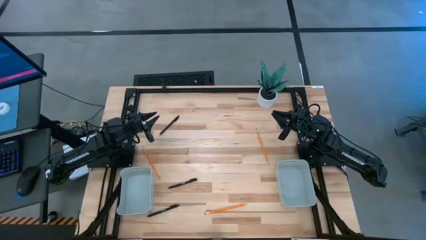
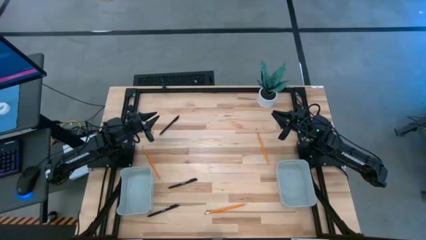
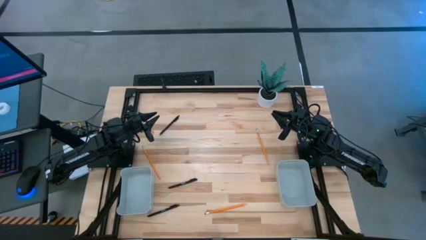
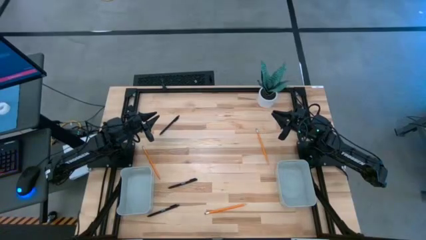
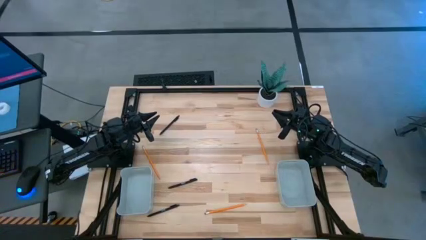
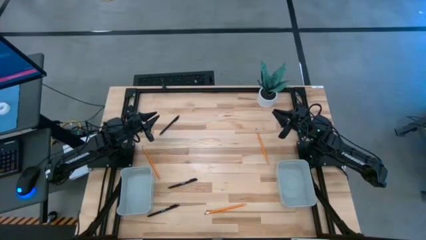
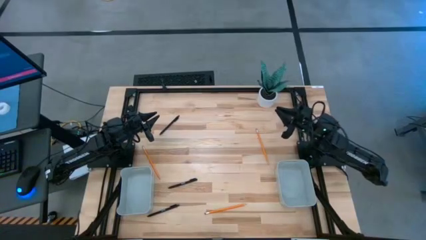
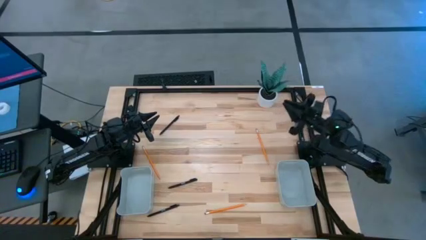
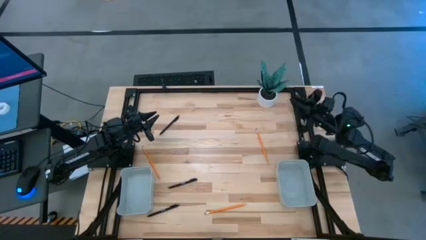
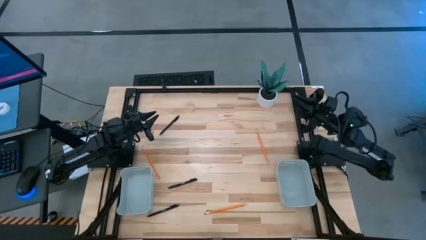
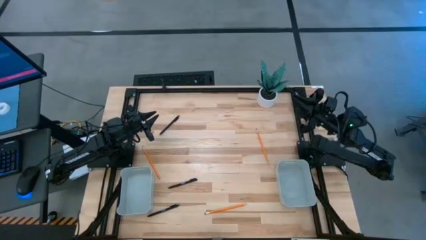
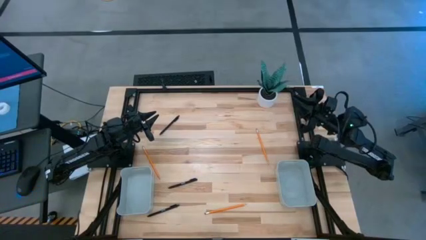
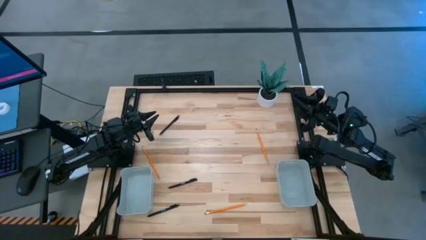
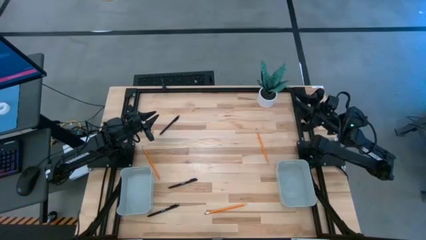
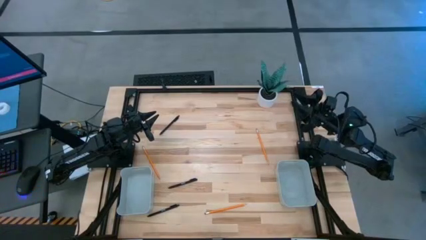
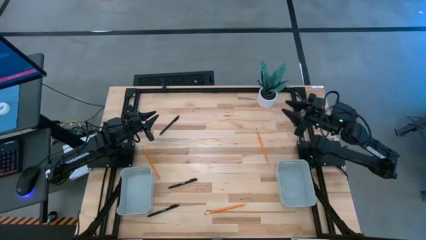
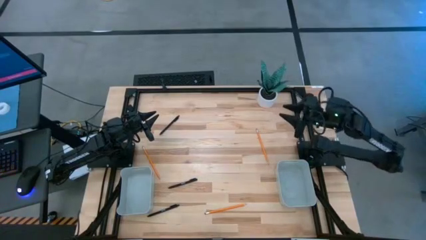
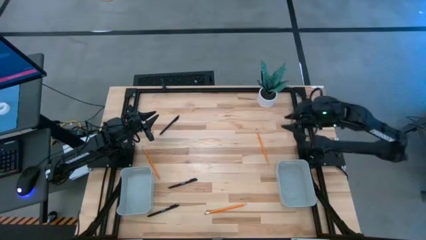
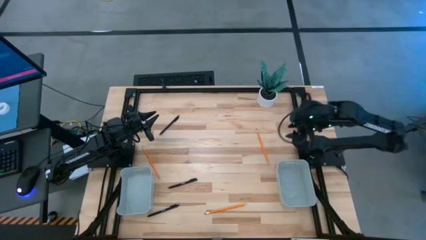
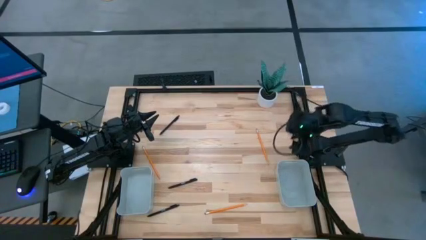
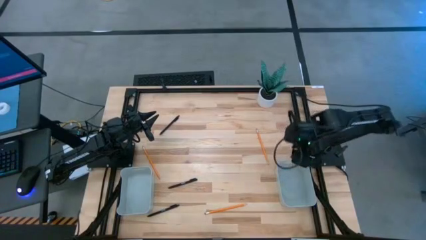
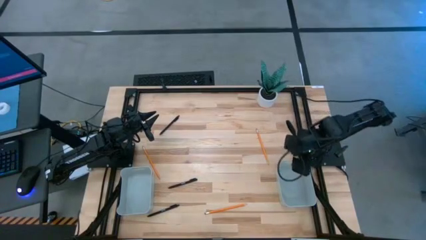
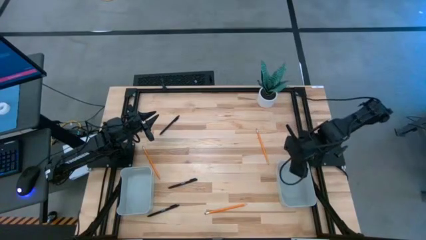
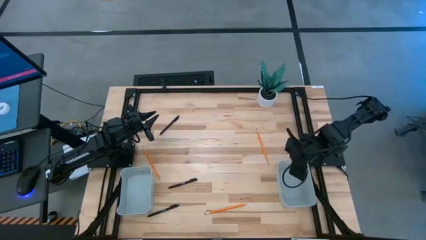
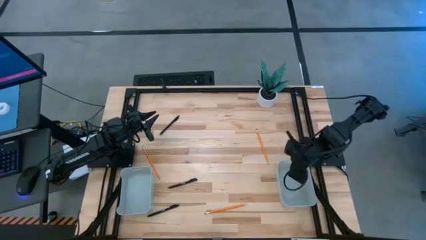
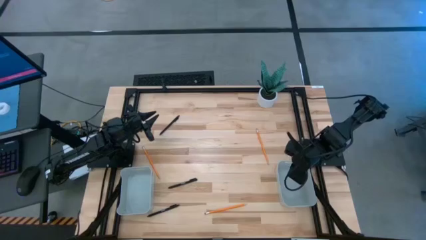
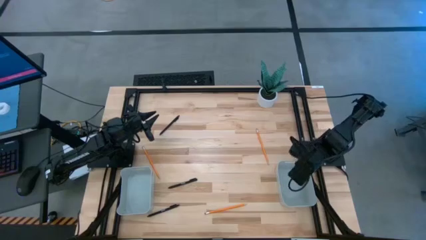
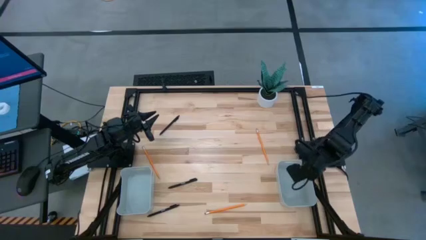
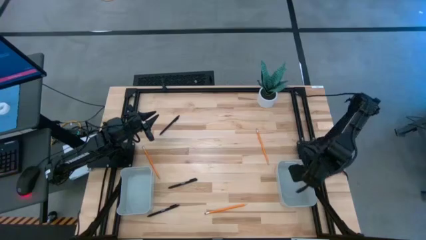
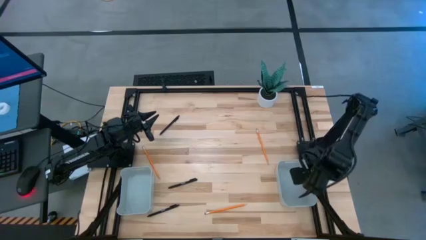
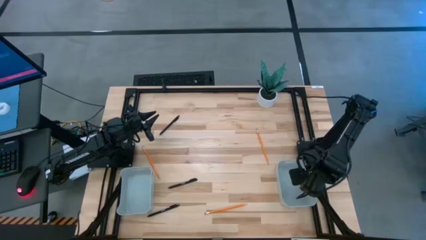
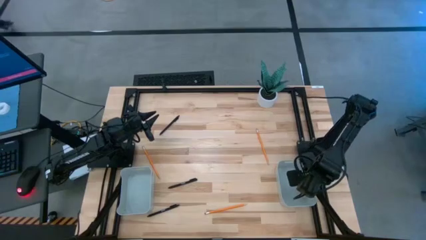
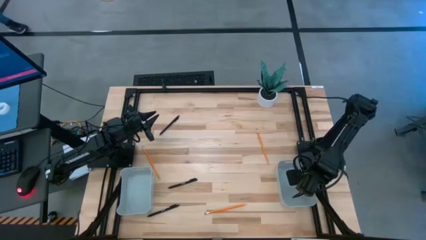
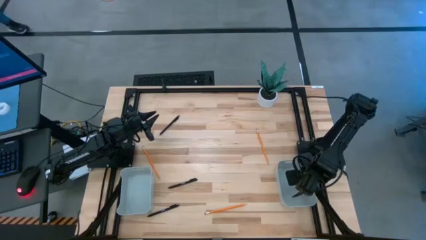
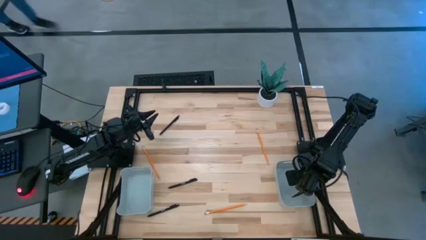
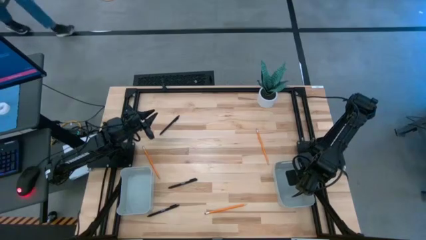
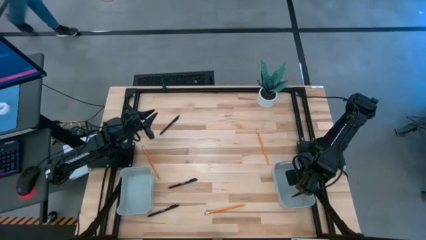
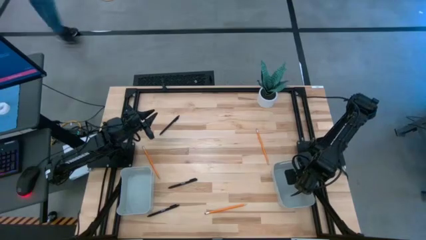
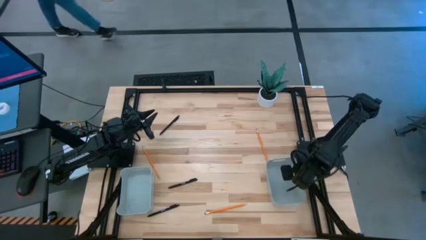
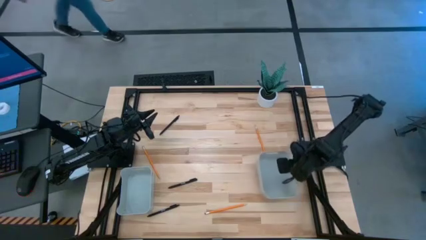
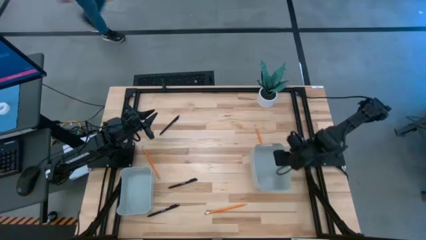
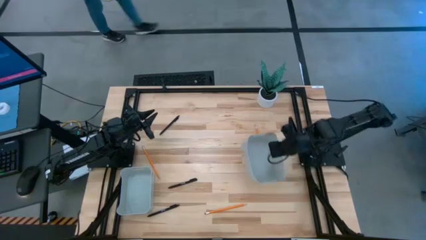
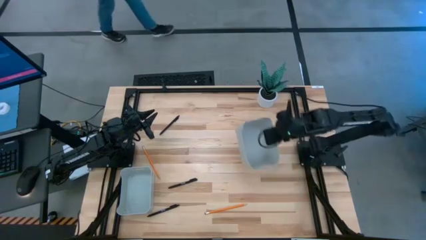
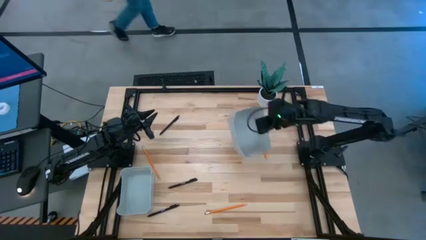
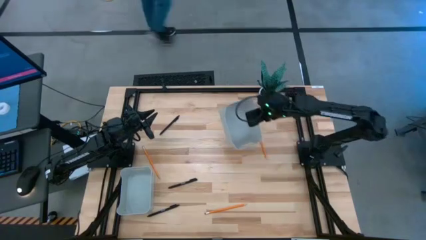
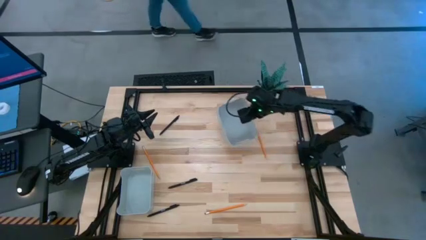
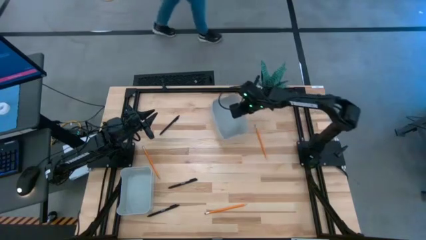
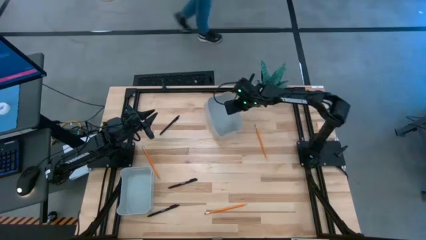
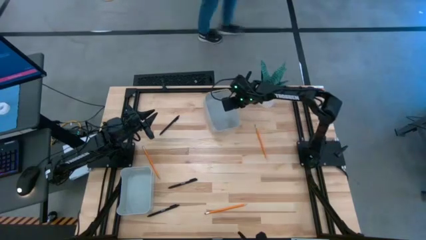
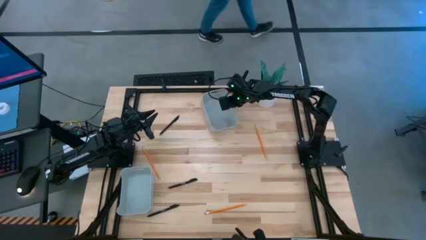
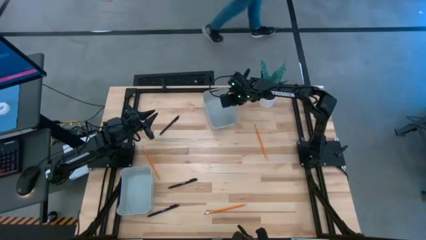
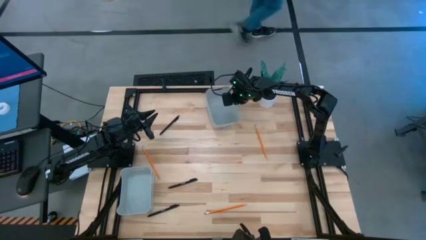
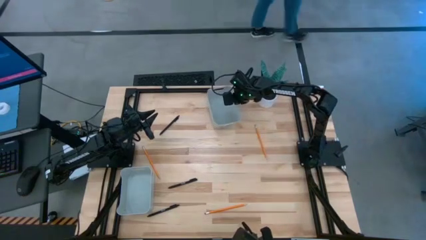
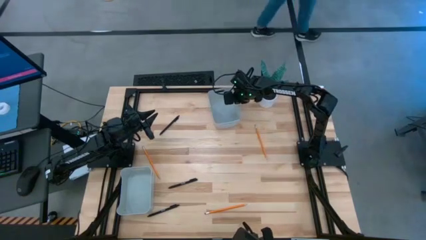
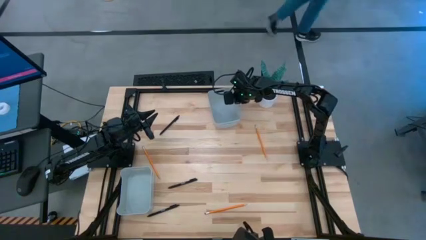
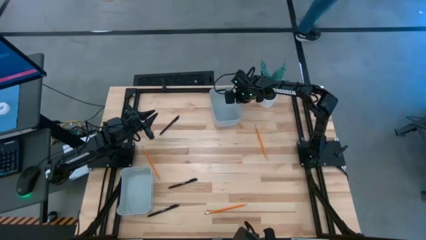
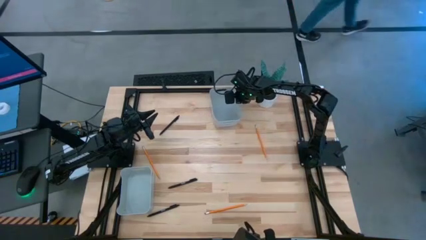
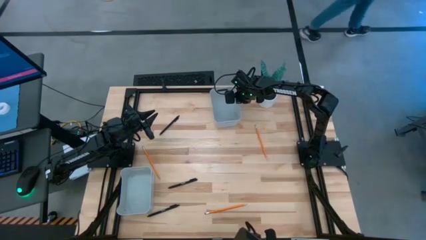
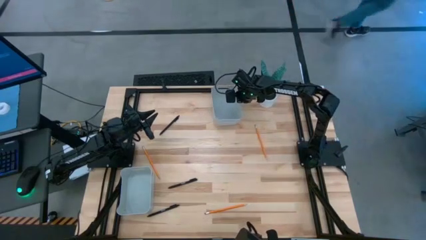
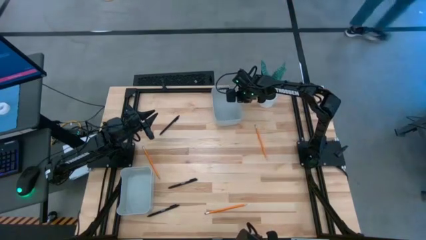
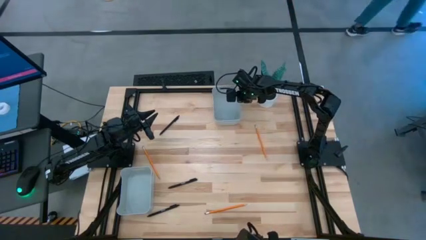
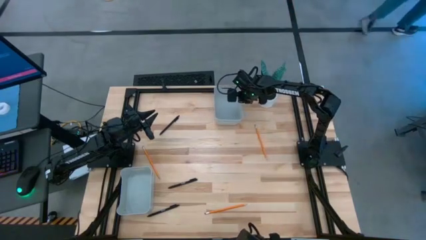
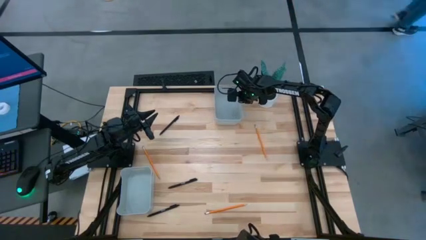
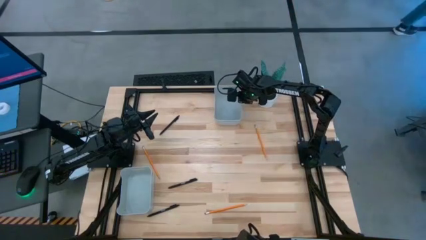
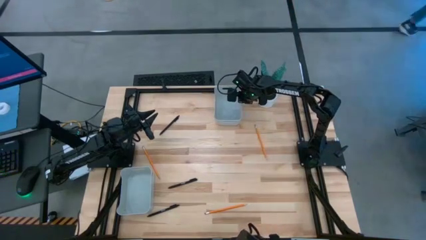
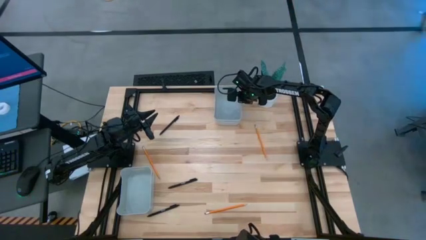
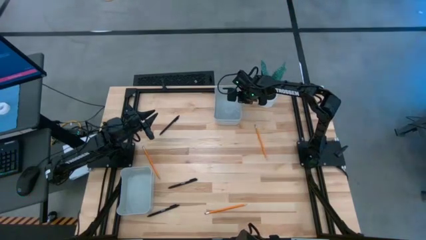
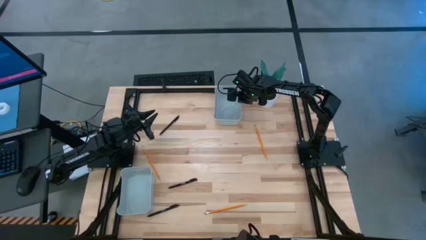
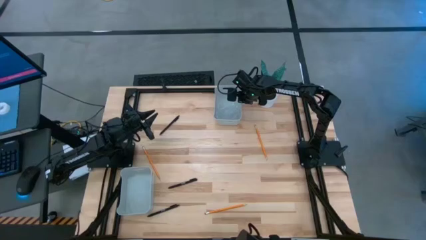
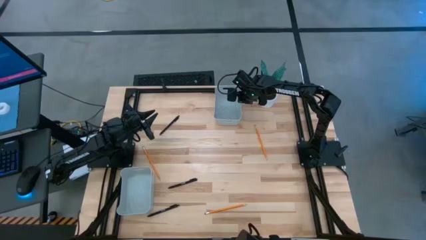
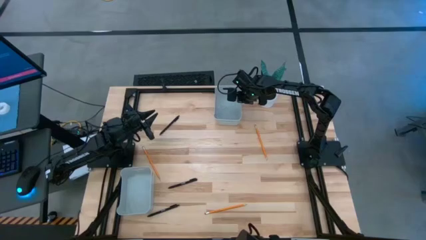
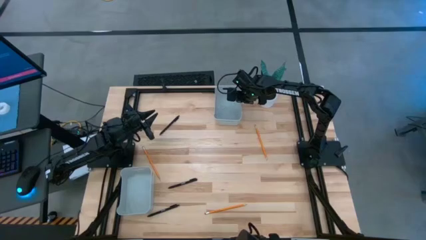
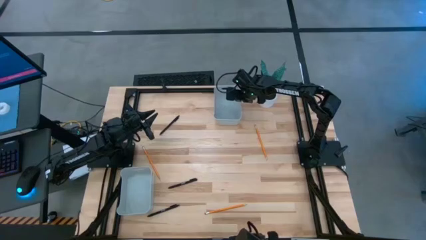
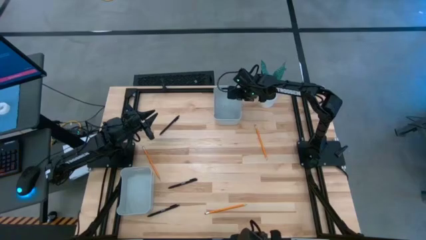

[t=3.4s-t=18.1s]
Task: Sort pens & pencils
Move the right gray bin to the top center of the table
